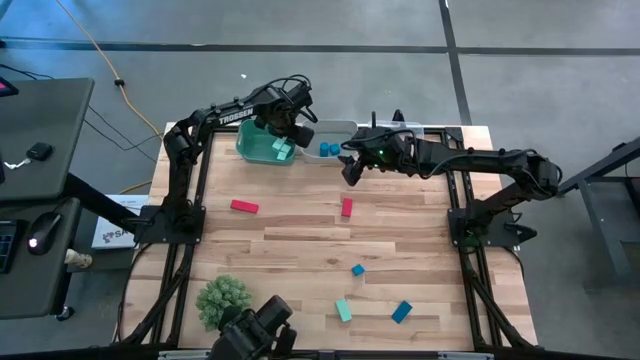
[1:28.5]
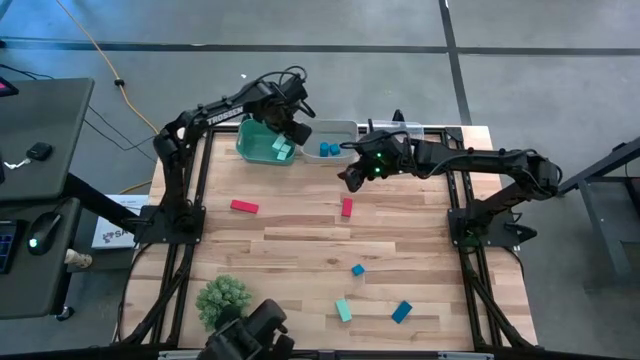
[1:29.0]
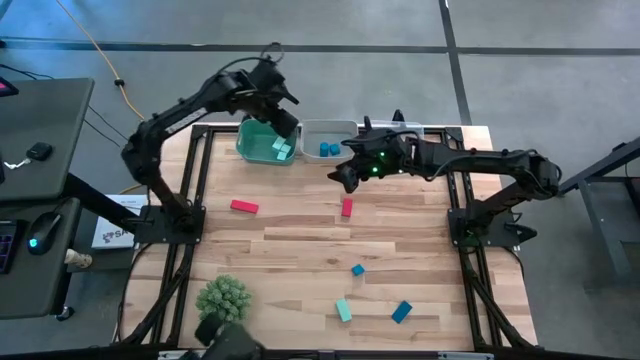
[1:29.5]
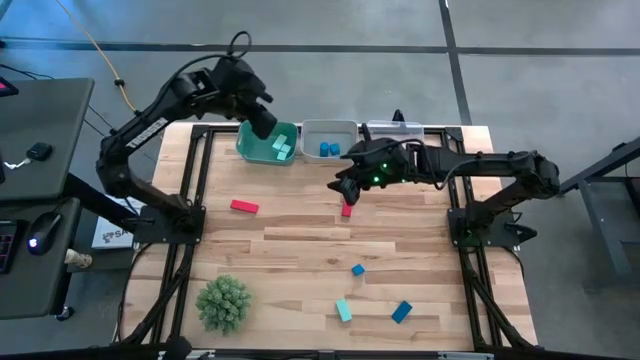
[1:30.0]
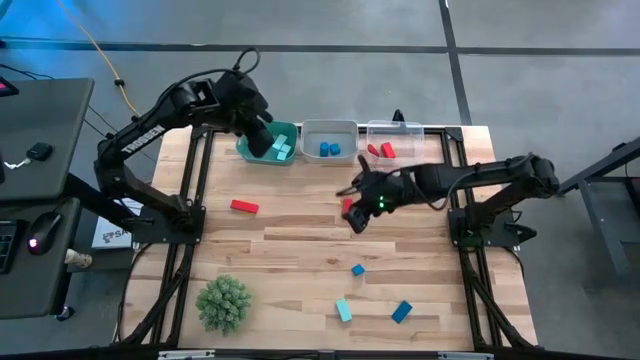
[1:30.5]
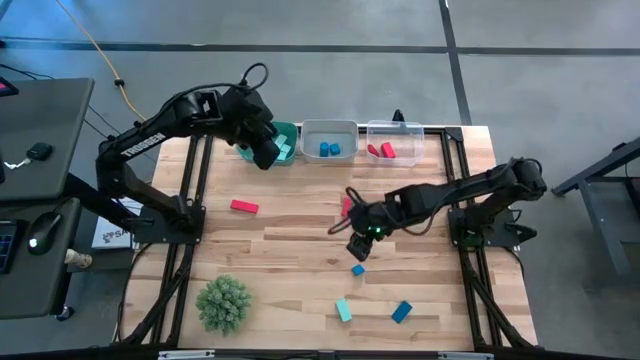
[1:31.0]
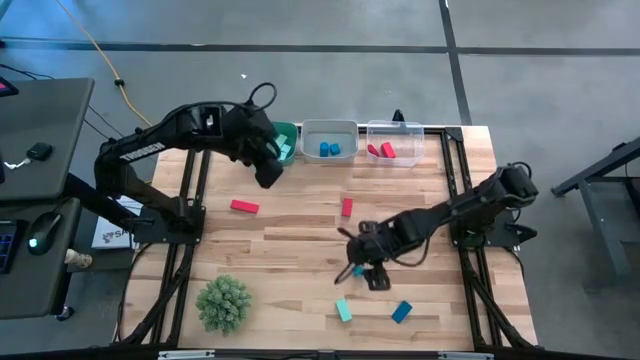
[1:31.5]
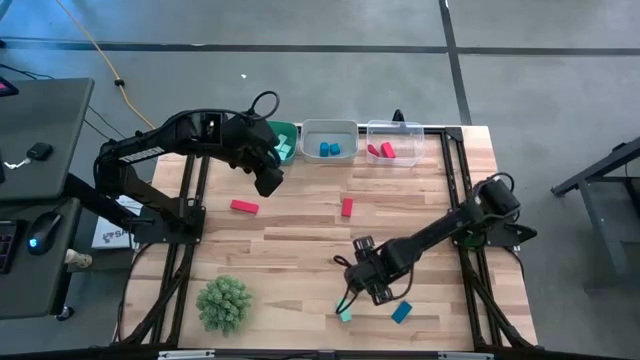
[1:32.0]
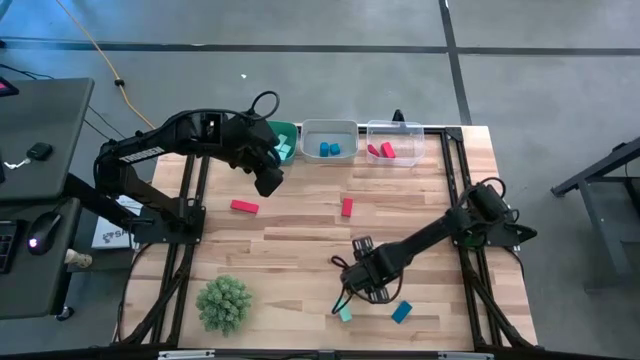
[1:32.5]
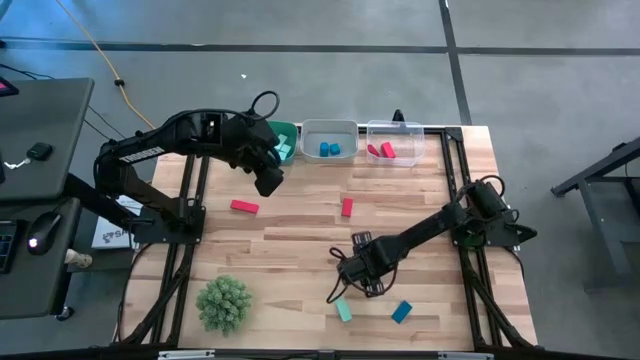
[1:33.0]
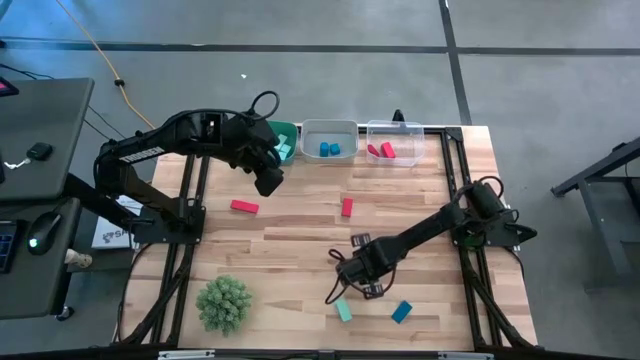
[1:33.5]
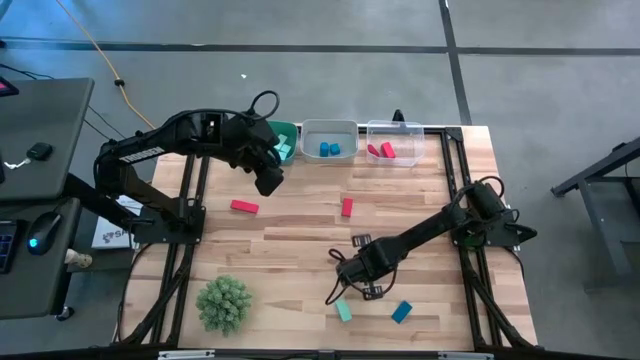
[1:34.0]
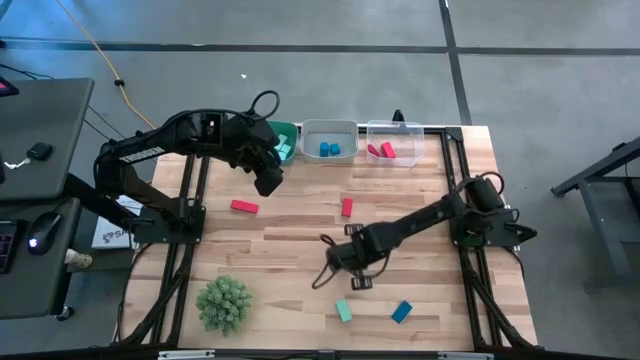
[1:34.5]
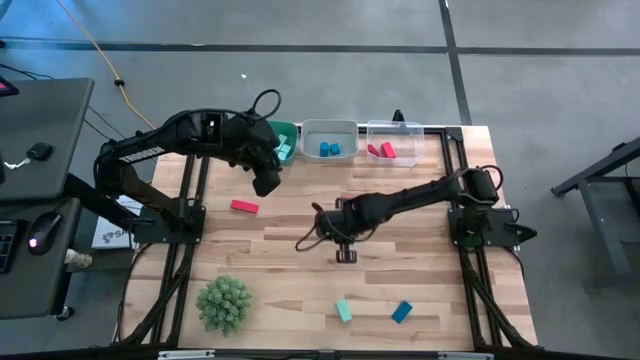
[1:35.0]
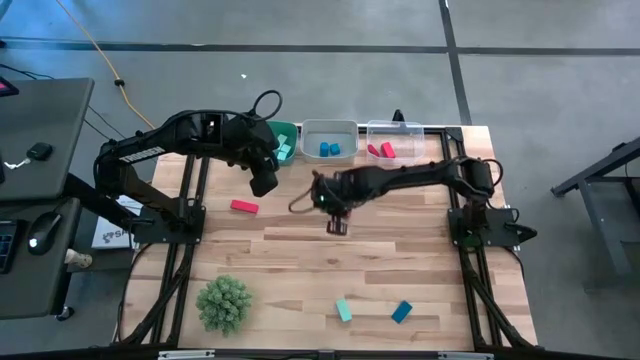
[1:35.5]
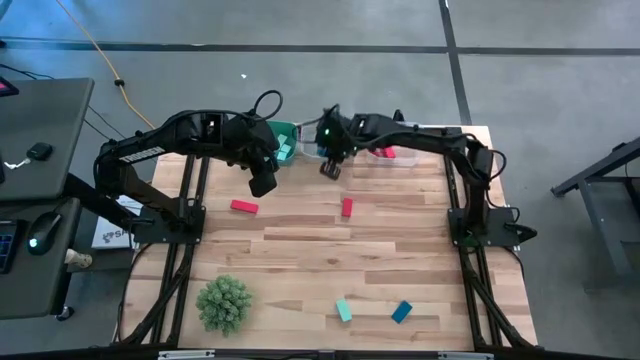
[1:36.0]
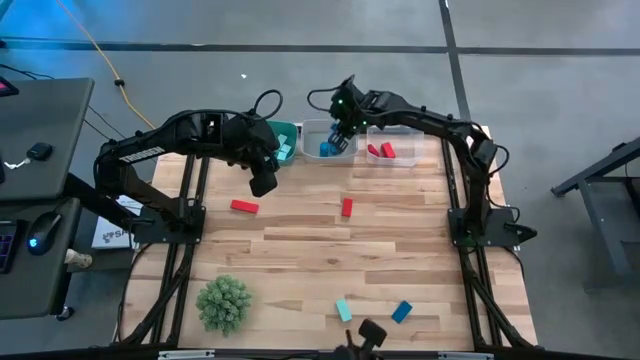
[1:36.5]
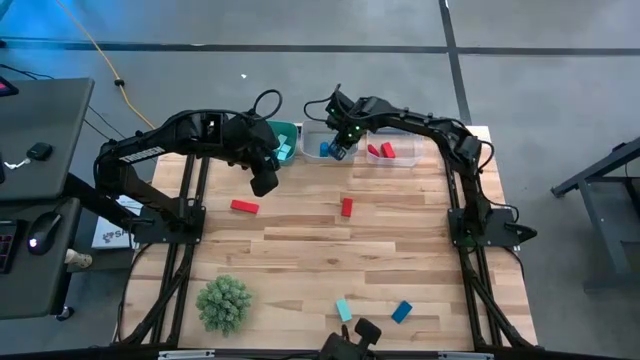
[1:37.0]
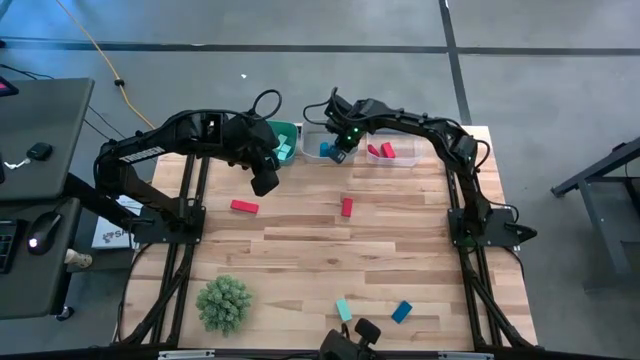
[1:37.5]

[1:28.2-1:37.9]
Task: Sort & place blocks by color
Put the left blue block into the gray bin

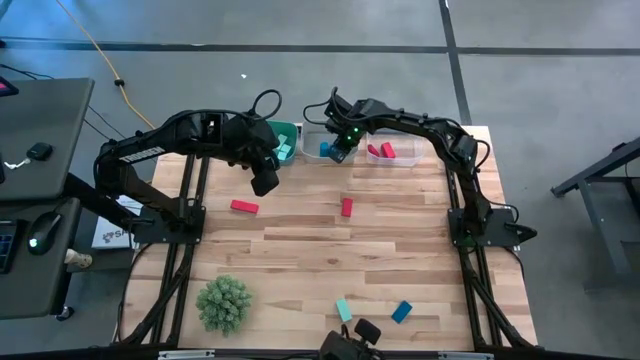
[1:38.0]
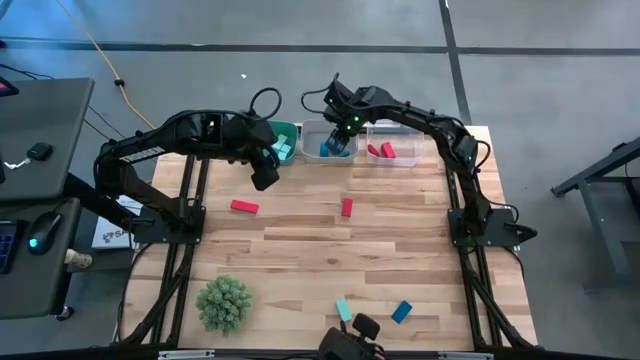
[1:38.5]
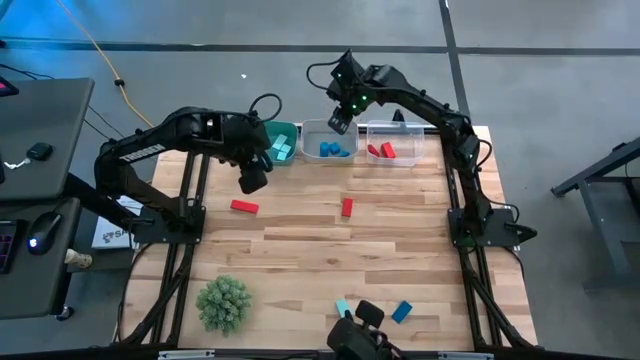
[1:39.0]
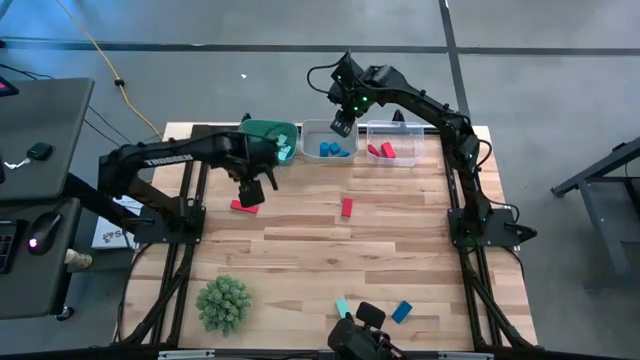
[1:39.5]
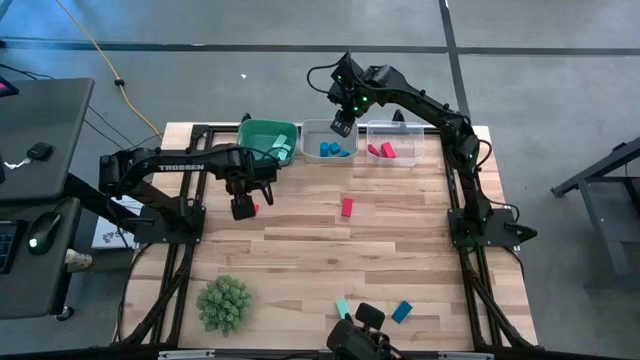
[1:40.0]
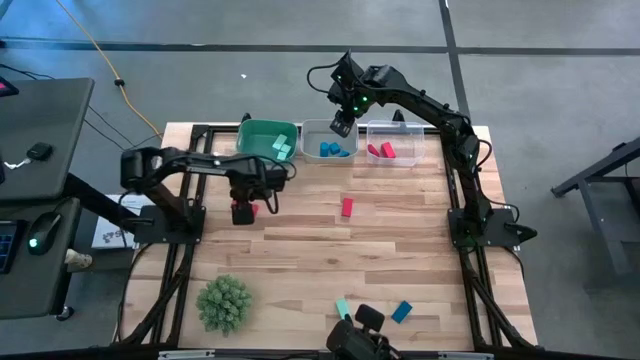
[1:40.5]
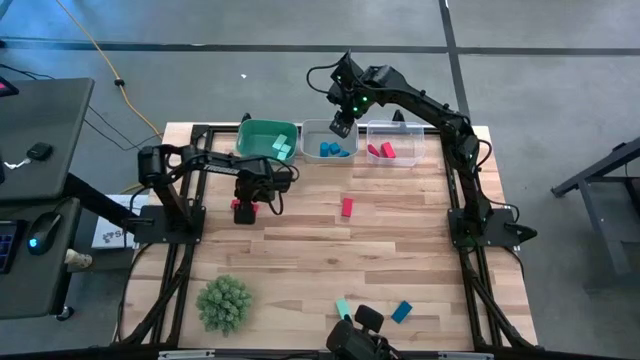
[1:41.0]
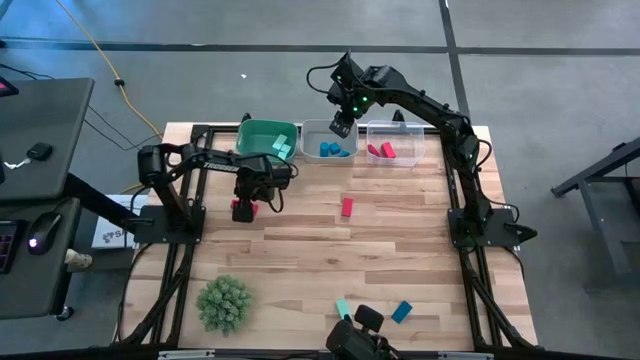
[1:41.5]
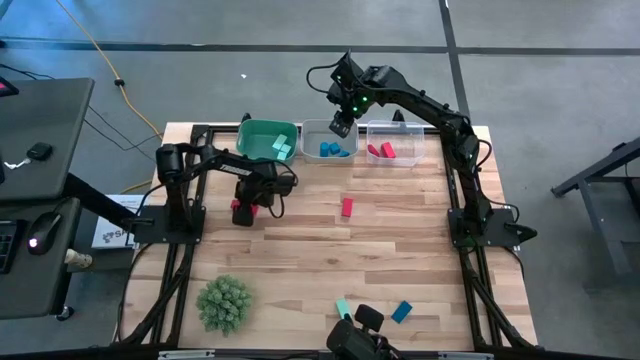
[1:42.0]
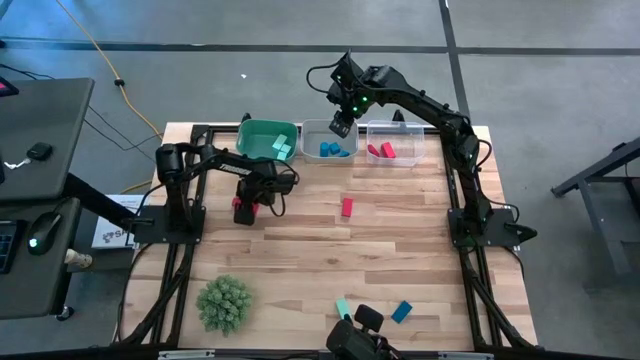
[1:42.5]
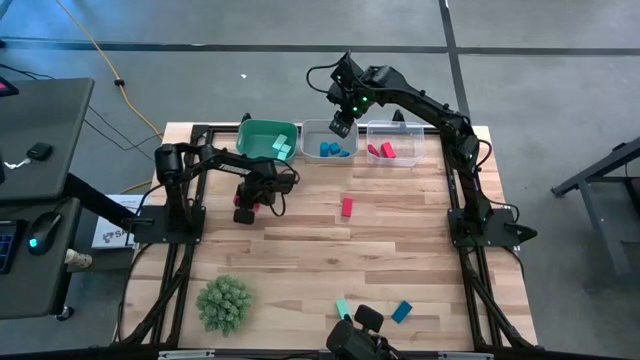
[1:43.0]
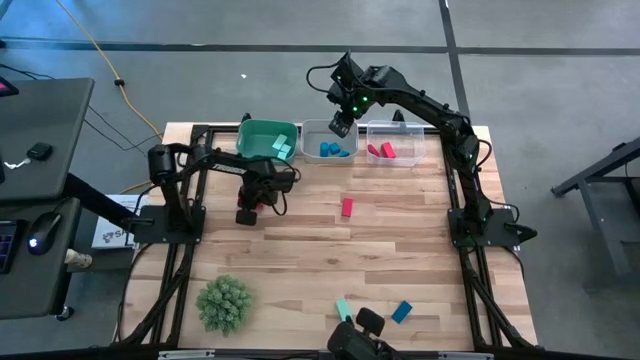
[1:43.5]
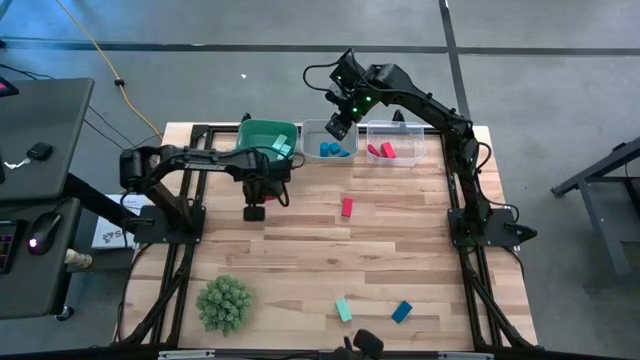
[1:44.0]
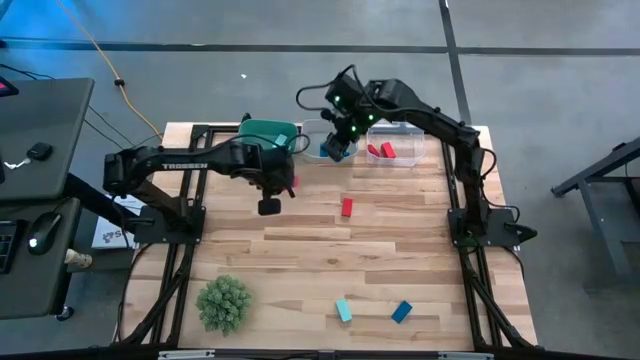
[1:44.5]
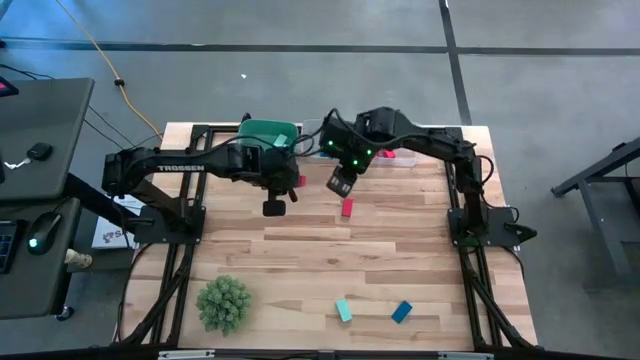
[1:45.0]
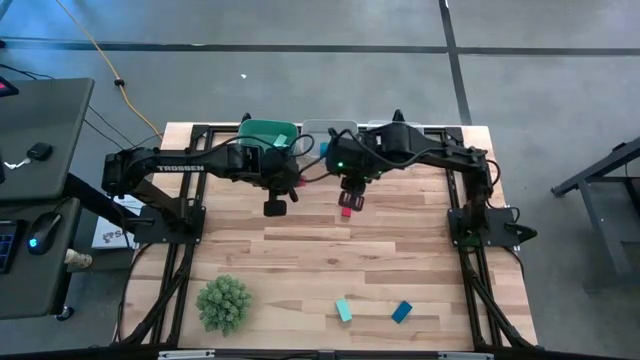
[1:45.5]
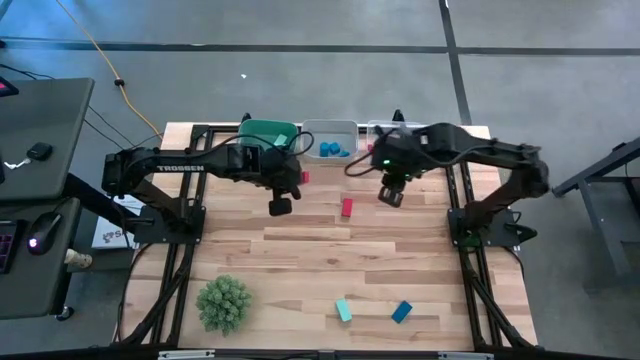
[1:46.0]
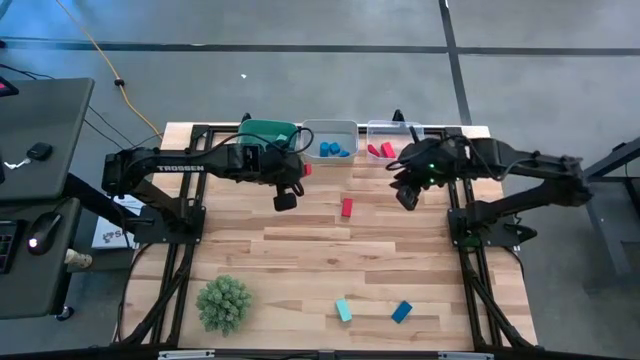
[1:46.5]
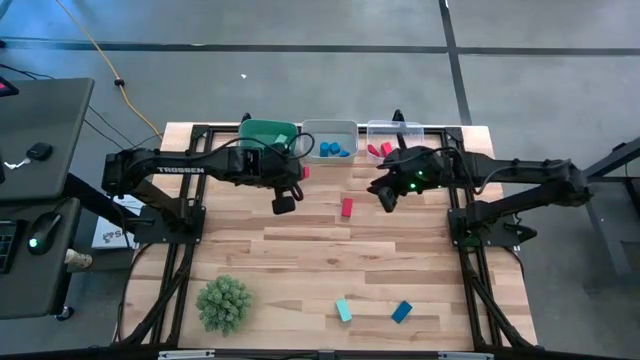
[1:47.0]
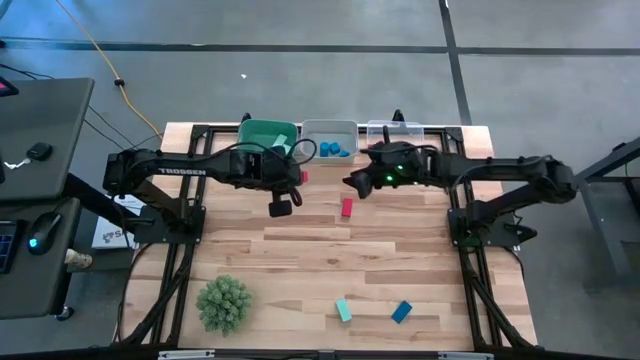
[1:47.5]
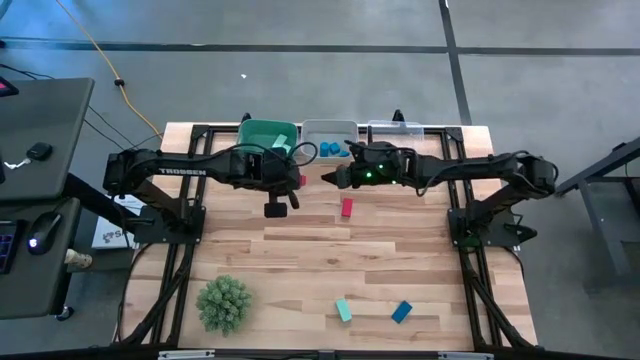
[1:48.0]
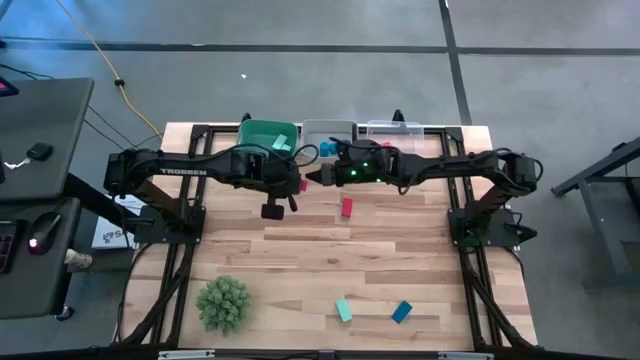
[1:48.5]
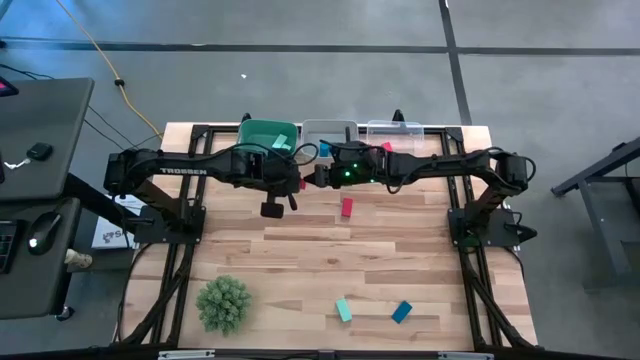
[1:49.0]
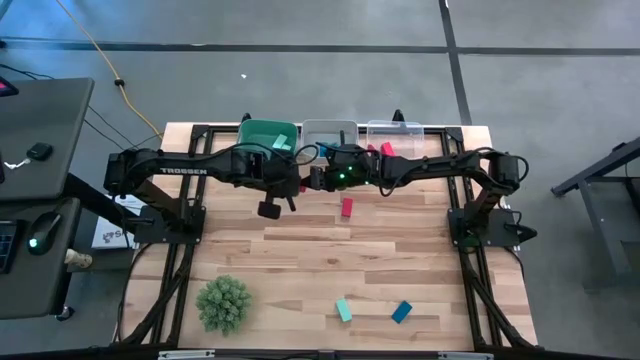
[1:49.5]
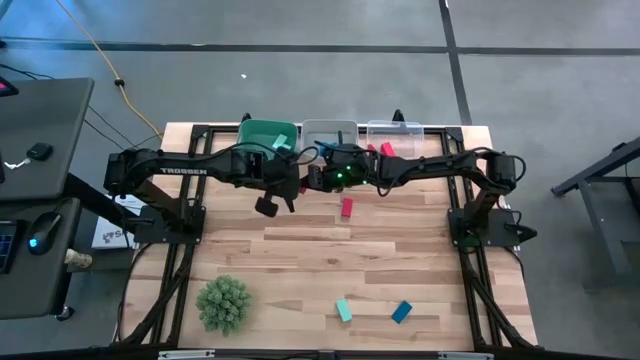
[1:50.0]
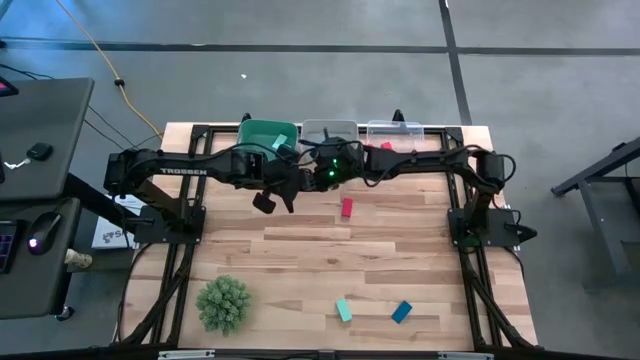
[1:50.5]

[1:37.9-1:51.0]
Put the left red block into the transparent bin
